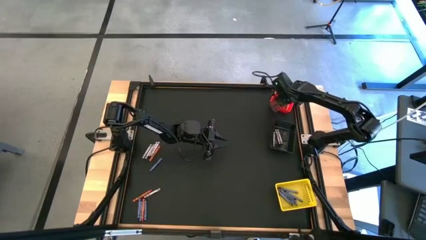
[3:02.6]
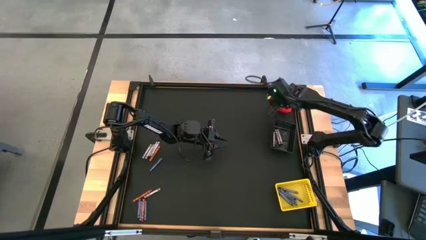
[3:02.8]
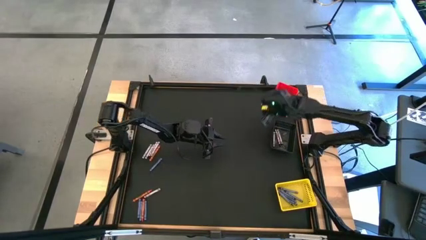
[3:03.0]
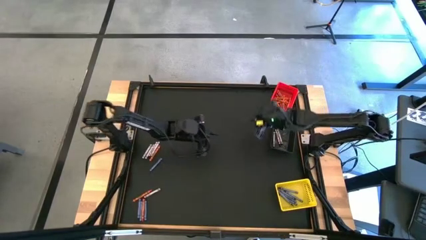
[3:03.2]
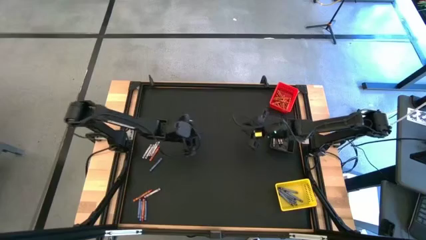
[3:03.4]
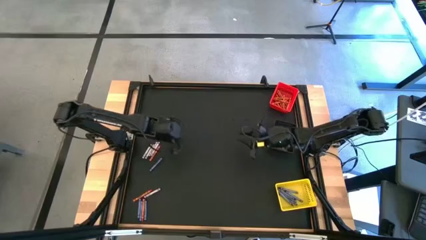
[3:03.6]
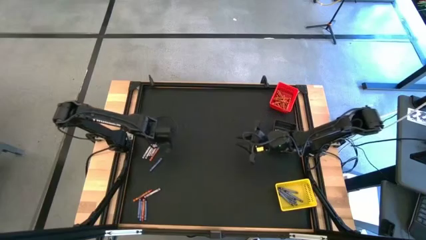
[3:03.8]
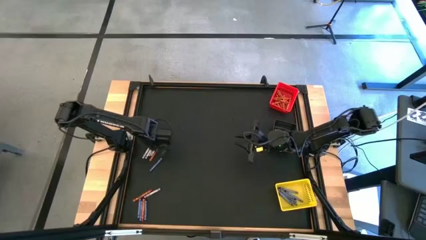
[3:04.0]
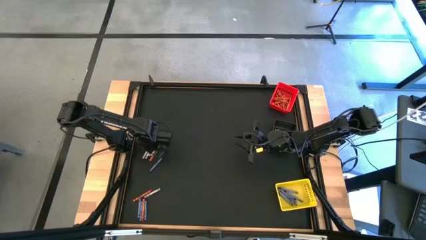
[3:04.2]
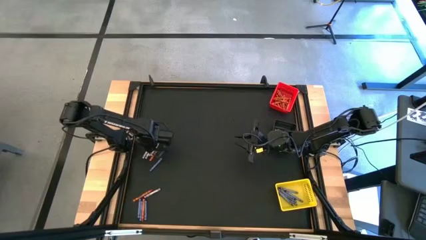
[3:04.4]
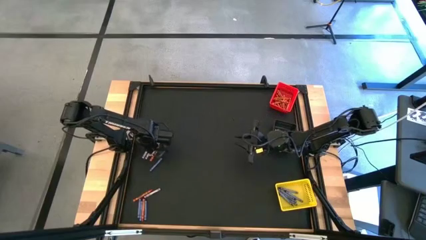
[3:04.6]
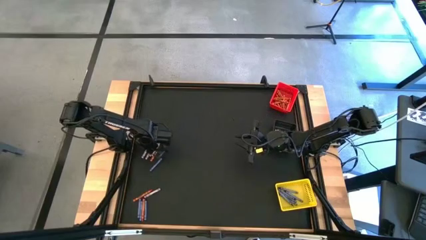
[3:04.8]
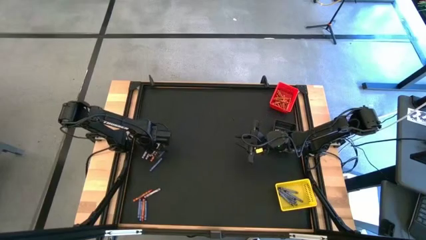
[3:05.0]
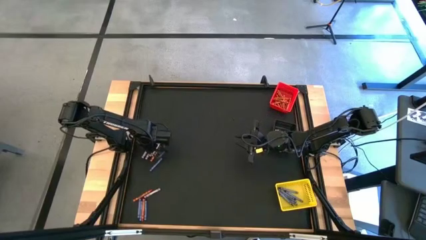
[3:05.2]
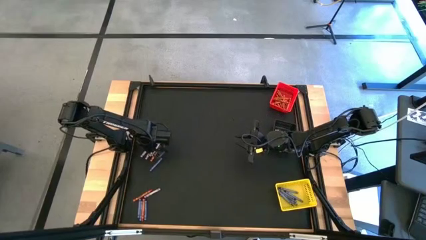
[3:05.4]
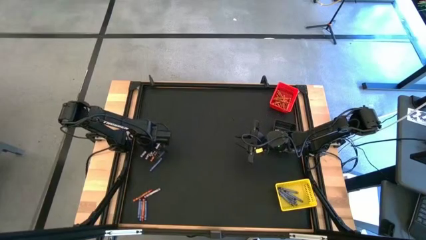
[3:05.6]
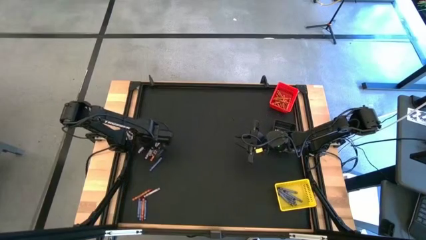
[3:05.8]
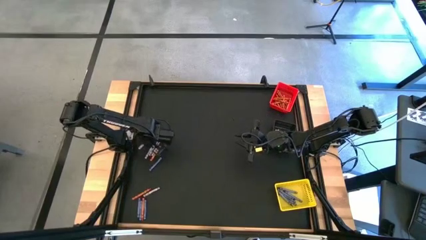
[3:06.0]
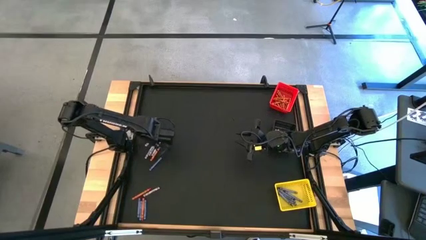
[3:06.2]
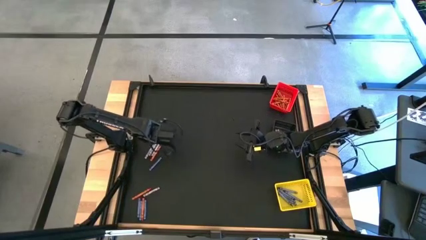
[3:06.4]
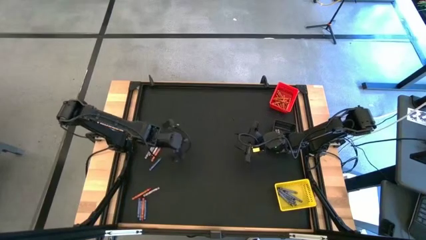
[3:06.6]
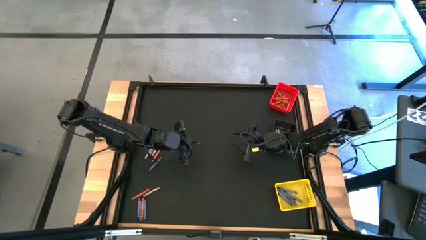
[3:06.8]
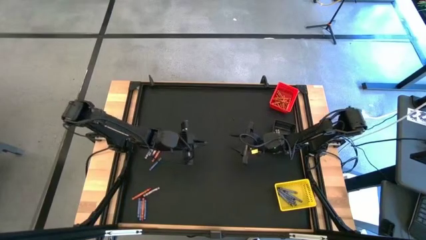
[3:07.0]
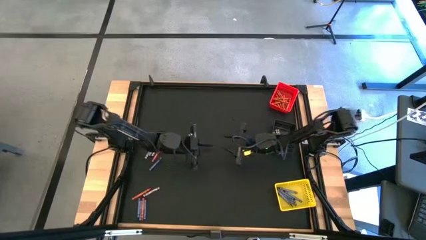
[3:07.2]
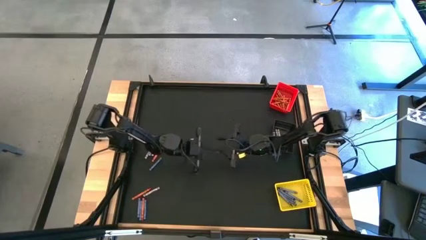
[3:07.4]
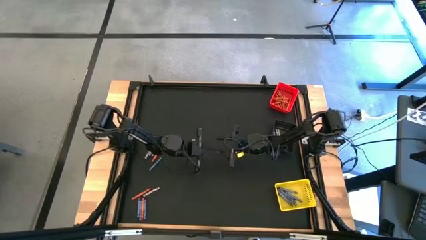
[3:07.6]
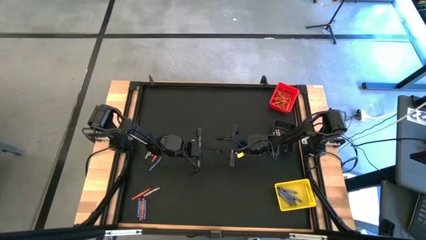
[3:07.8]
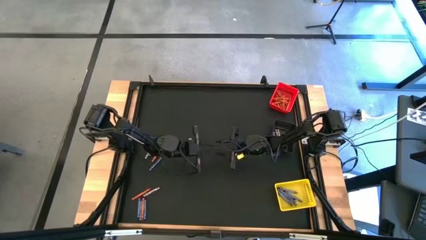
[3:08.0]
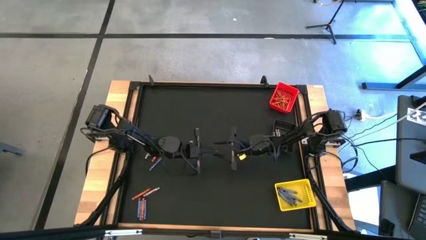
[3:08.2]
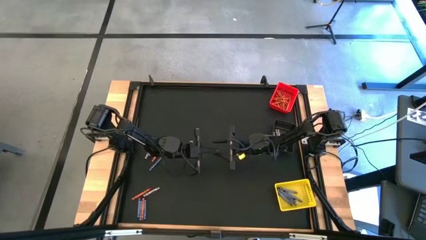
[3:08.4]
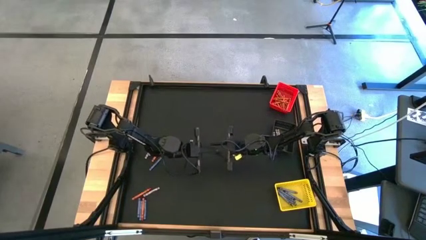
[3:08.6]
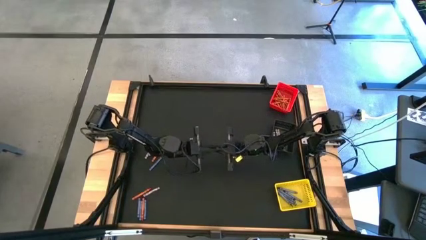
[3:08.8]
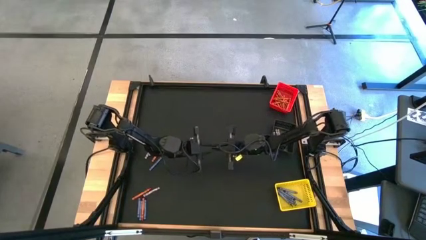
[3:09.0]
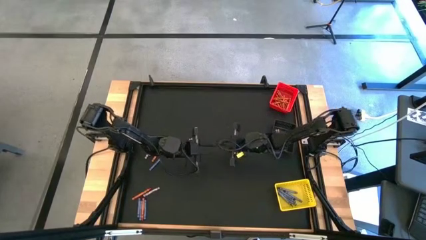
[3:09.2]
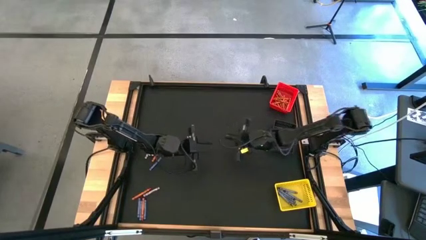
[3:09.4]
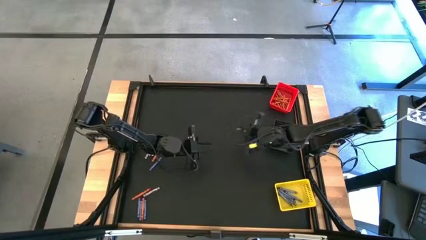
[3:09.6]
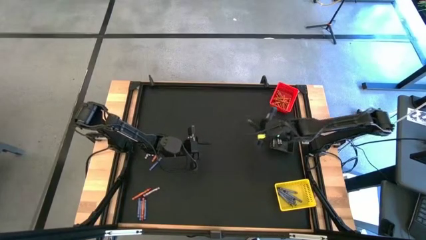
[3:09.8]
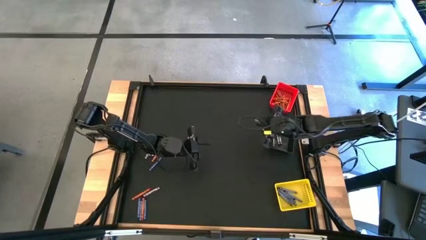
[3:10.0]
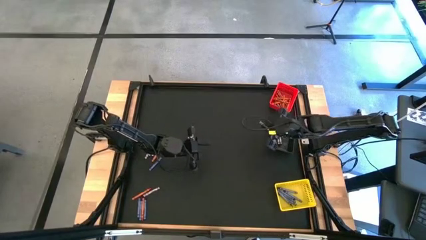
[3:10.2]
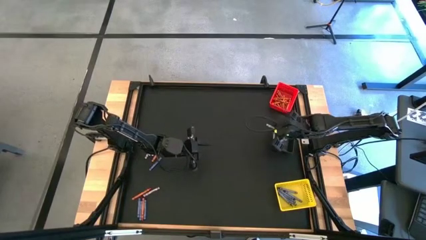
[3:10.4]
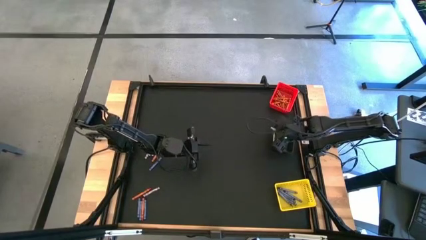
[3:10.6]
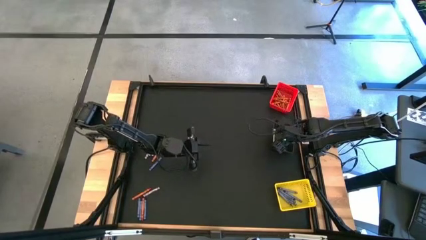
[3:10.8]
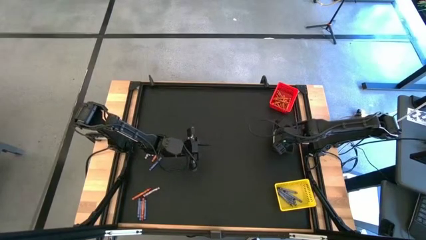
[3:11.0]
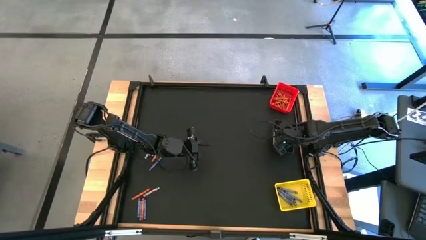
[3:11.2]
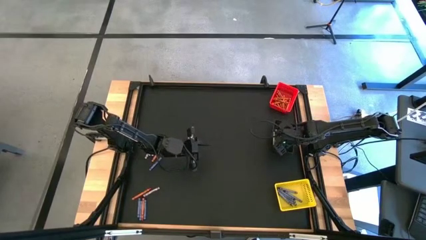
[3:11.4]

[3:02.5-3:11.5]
Task: Sort crayons
Put the black crayon into the black bin

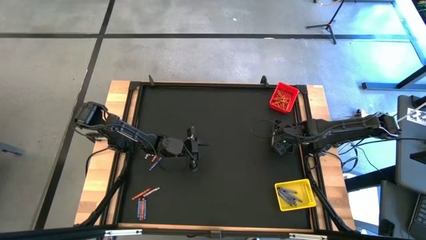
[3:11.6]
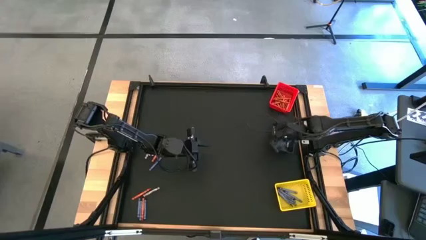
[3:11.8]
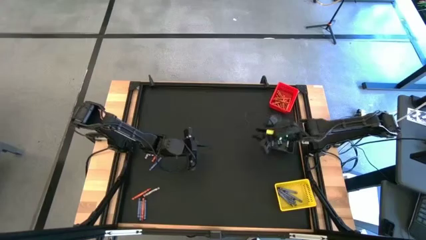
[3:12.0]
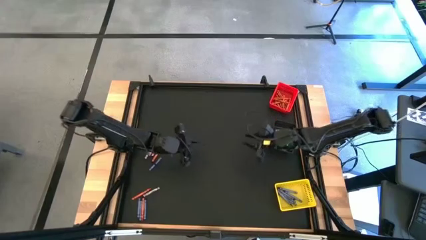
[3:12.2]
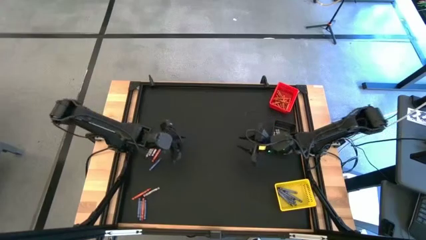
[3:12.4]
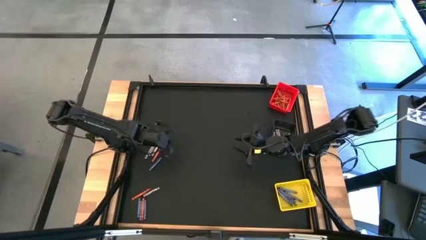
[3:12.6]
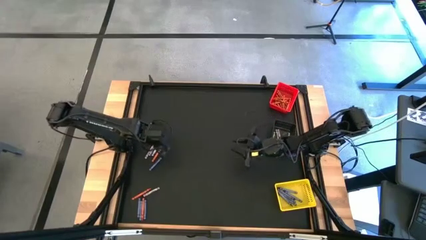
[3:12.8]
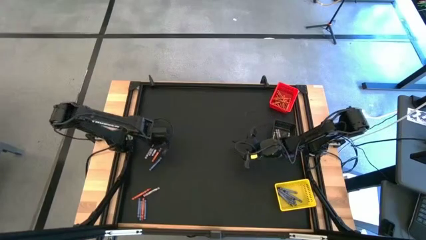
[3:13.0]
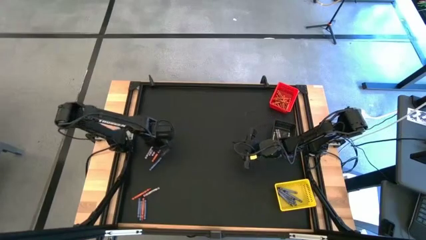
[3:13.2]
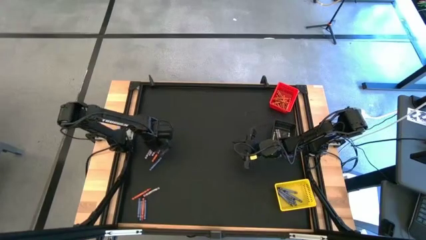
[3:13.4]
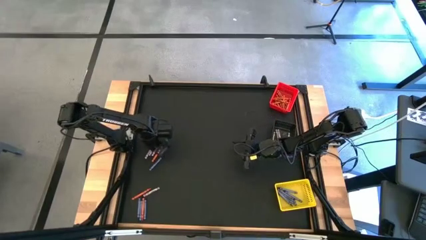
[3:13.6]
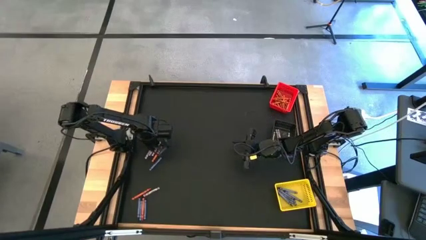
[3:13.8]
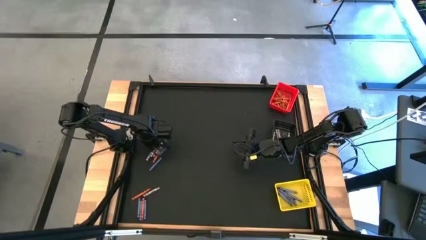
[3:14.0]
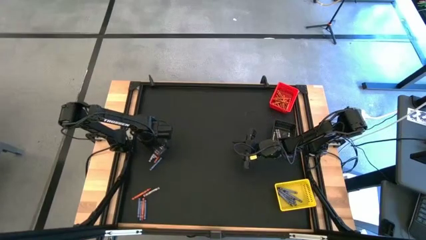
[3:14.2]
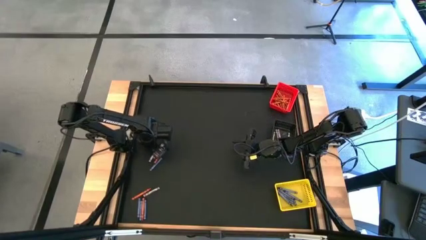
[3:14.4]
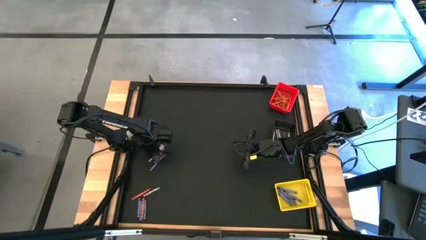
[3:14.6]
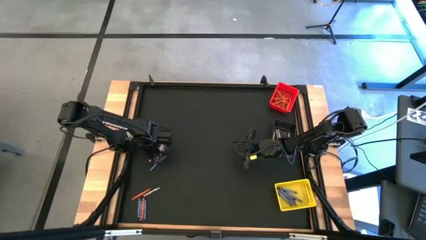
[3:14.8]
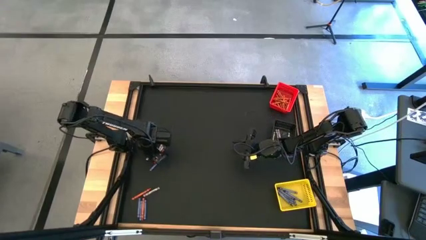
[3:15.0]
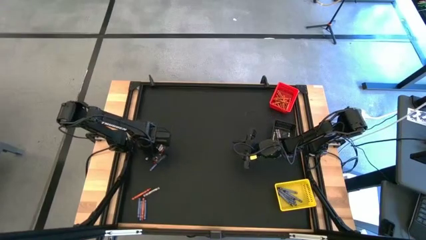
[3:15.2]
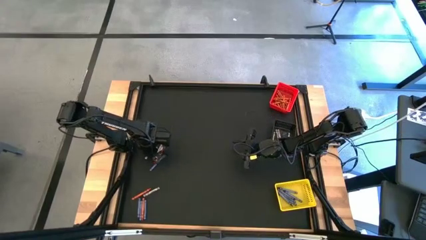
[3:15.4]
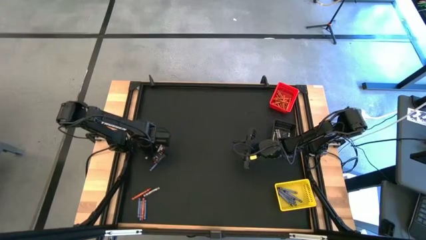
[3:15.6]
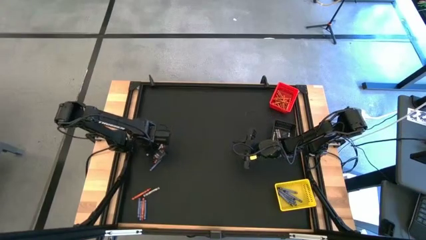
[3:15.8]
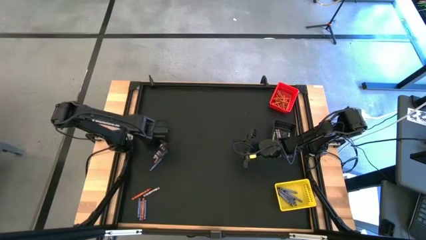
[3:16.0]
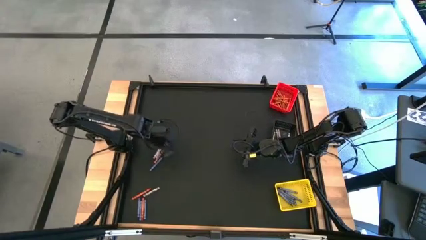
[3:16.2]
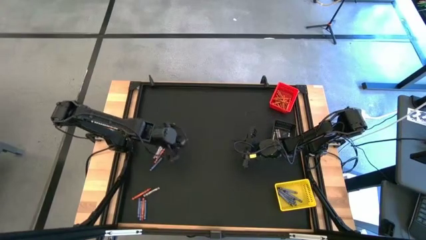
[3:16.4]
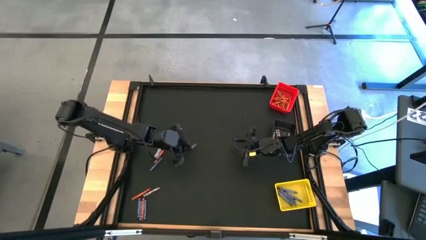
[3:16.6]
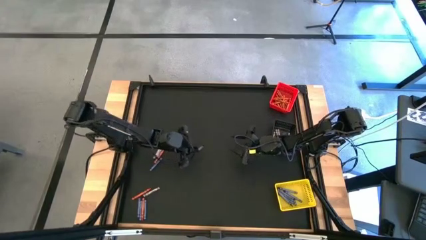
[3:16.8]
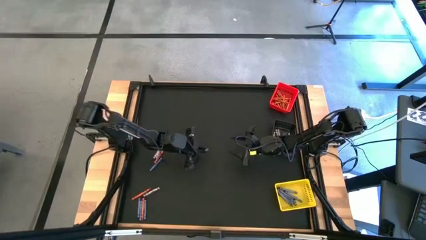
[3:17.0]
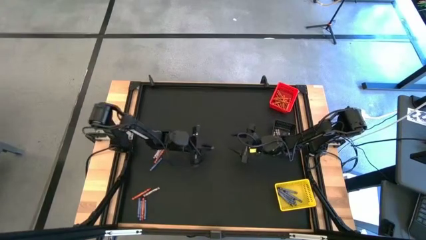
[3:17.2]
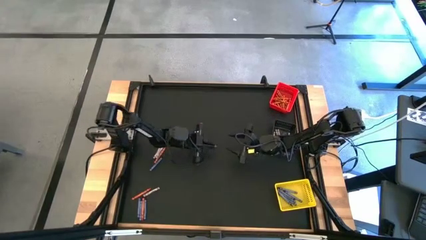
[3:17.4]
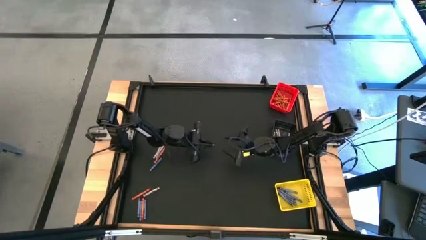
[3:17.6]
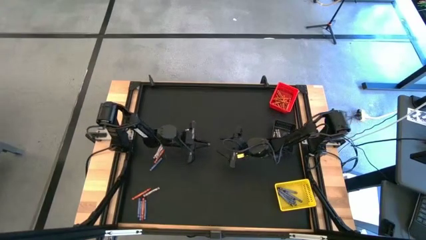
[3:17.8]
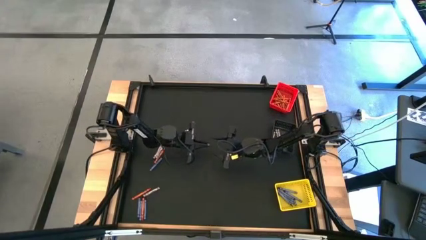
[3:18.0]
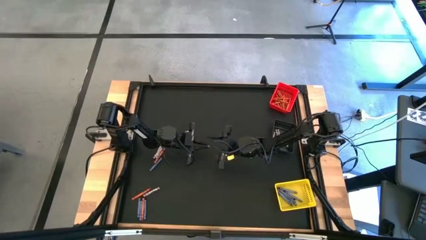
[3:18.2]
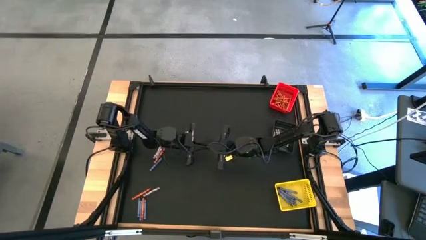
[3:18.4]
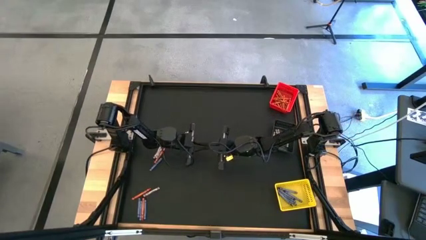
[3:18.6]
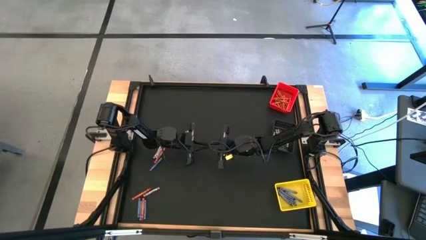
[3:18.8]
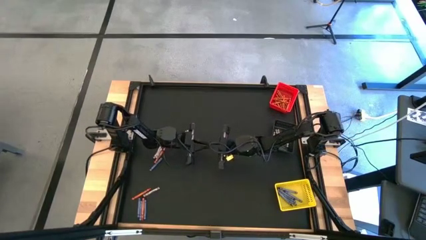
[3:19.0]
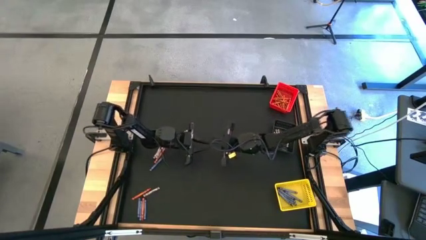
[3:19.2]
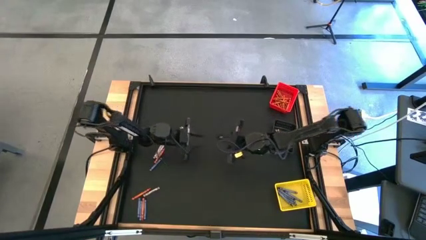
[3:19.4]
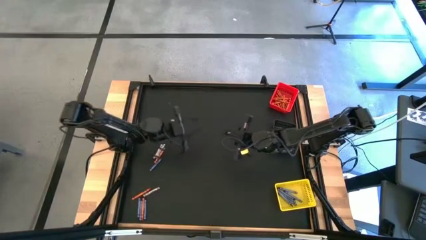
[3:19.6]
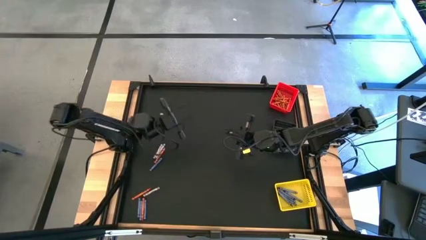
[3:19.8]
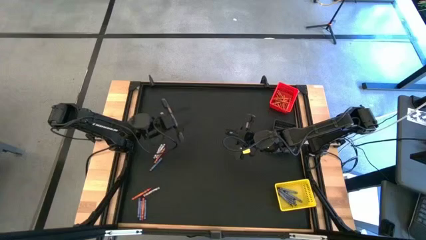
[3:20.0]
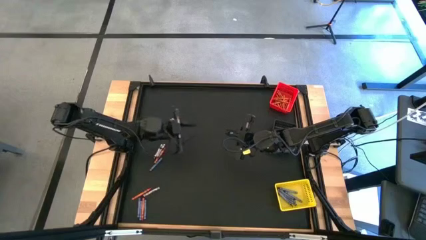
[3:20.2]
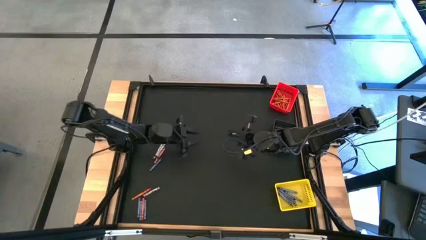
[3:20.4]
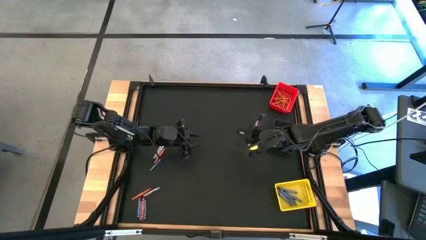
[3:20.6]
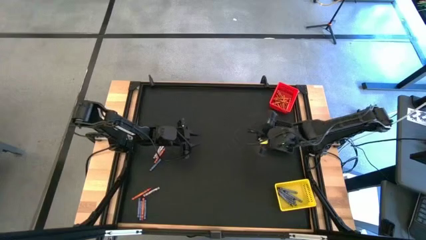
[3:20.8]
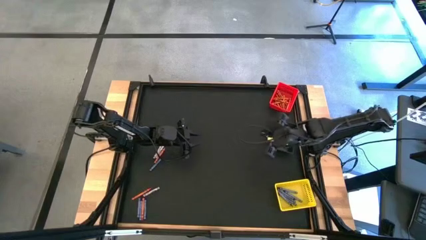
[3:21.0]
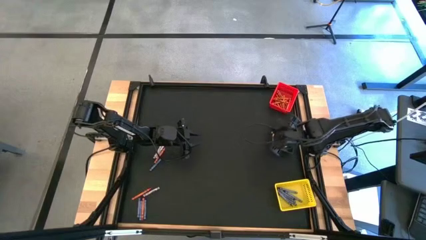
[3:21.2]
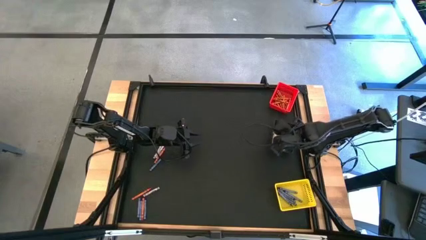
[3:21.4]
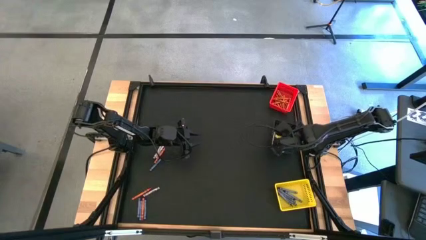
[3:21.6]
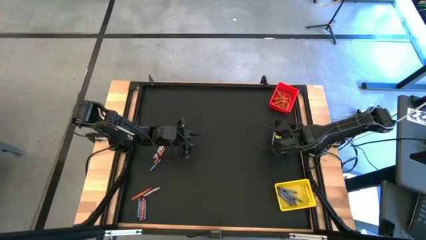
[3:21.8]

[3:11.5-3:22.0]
Put the black crayon into the black bin
